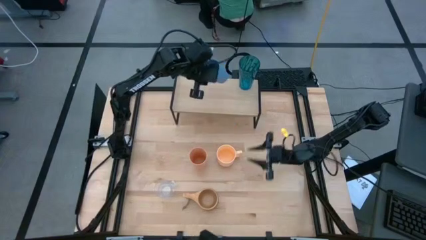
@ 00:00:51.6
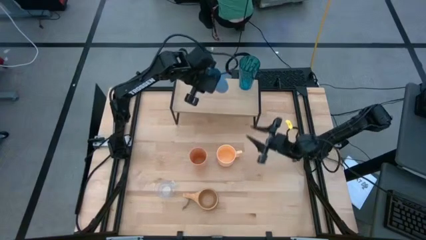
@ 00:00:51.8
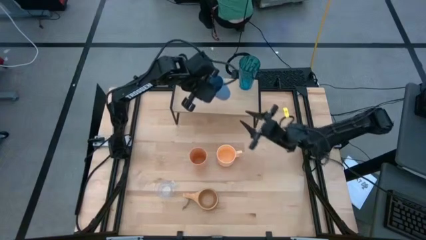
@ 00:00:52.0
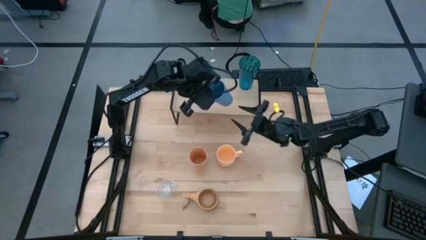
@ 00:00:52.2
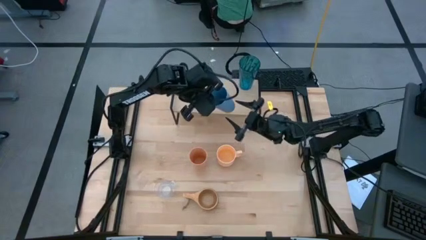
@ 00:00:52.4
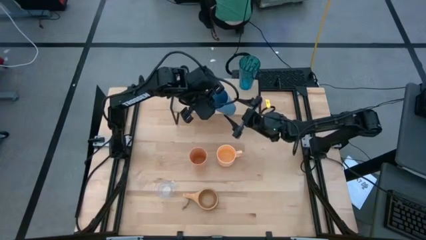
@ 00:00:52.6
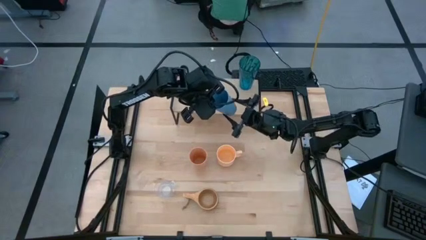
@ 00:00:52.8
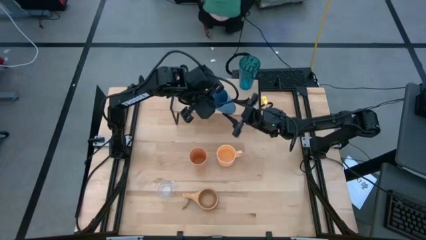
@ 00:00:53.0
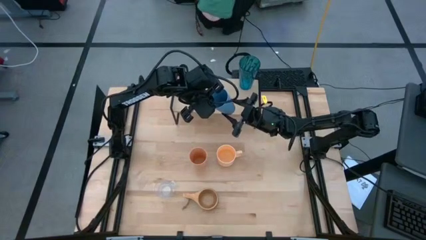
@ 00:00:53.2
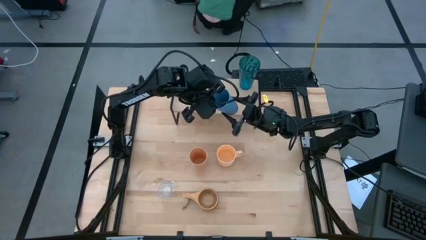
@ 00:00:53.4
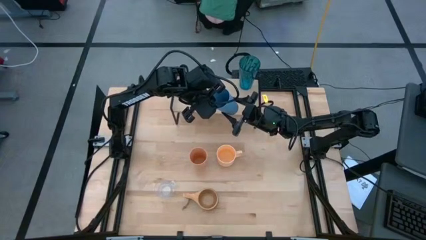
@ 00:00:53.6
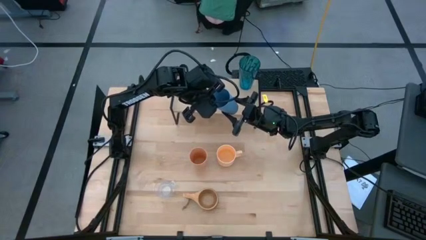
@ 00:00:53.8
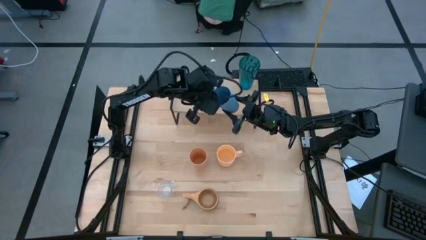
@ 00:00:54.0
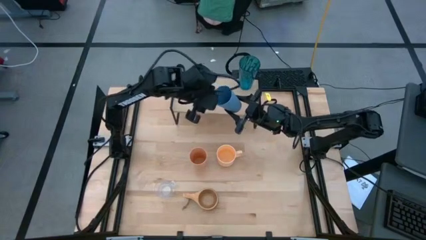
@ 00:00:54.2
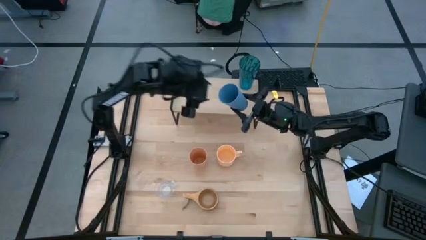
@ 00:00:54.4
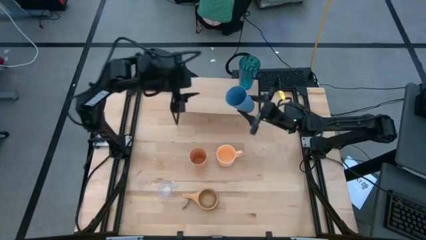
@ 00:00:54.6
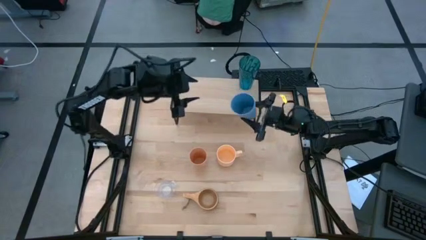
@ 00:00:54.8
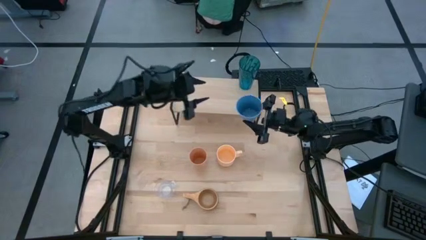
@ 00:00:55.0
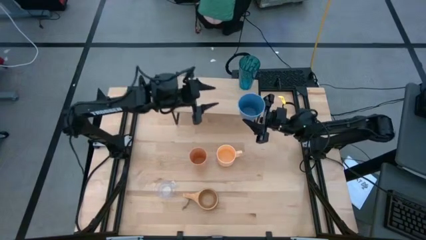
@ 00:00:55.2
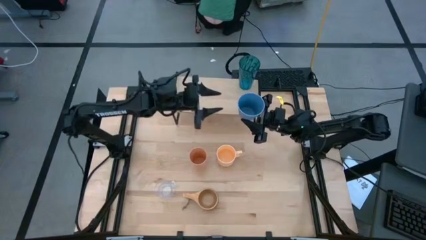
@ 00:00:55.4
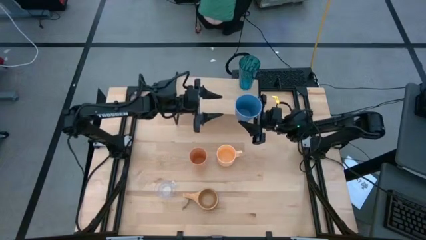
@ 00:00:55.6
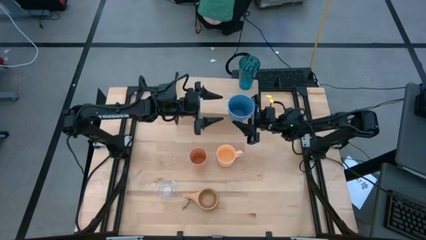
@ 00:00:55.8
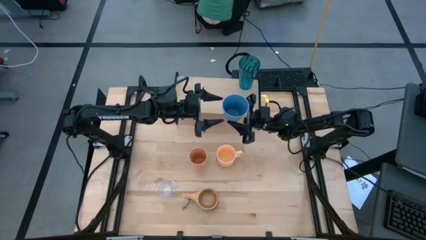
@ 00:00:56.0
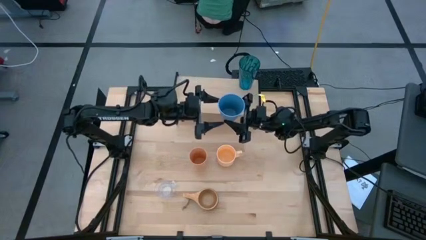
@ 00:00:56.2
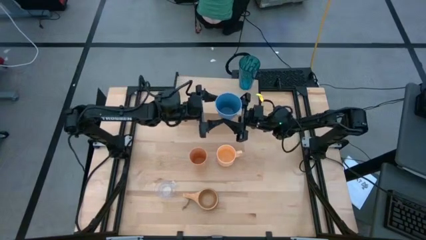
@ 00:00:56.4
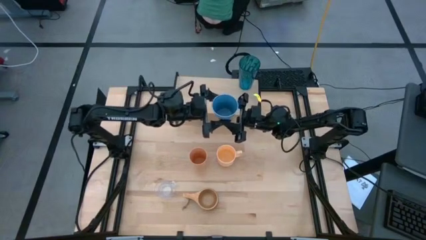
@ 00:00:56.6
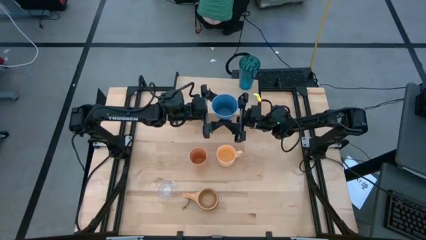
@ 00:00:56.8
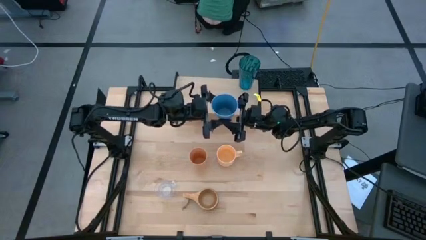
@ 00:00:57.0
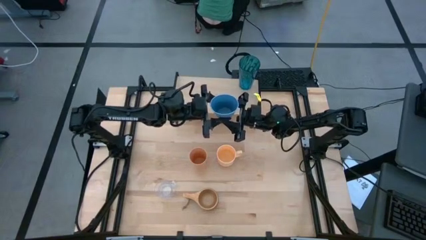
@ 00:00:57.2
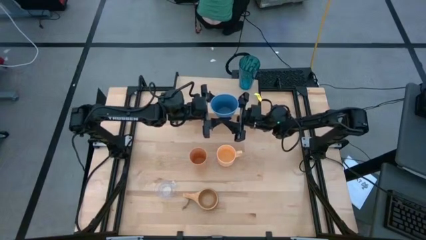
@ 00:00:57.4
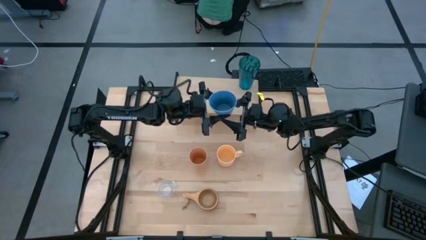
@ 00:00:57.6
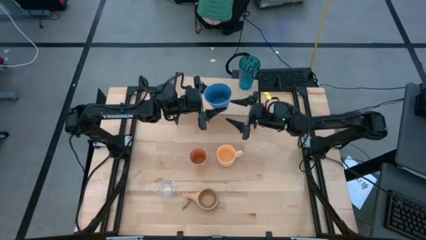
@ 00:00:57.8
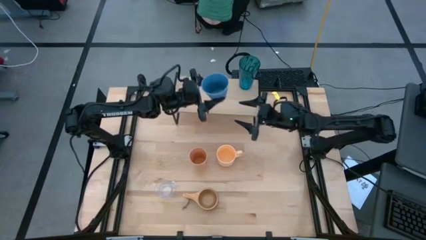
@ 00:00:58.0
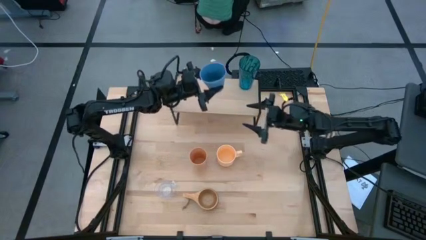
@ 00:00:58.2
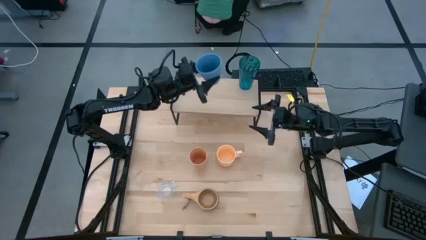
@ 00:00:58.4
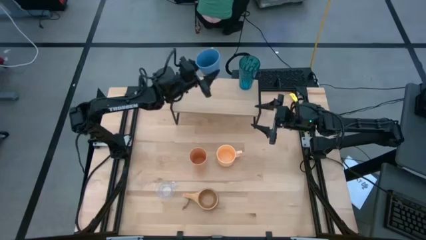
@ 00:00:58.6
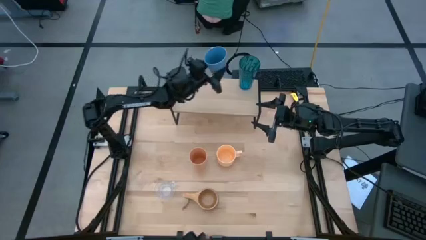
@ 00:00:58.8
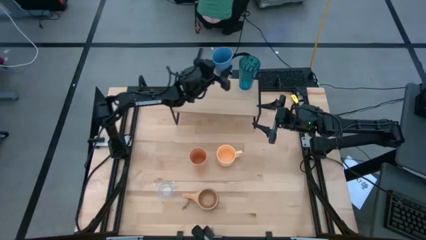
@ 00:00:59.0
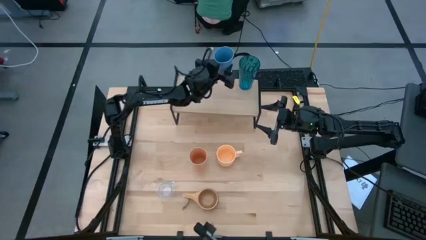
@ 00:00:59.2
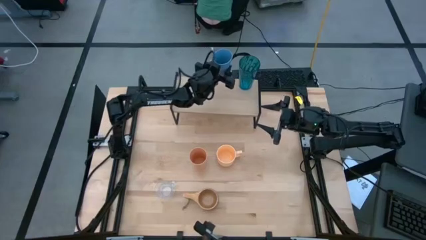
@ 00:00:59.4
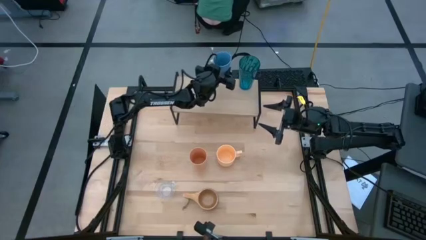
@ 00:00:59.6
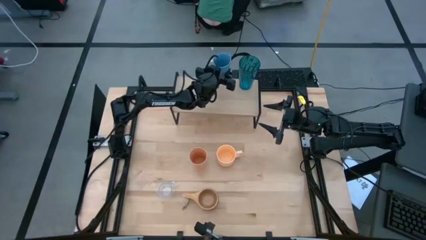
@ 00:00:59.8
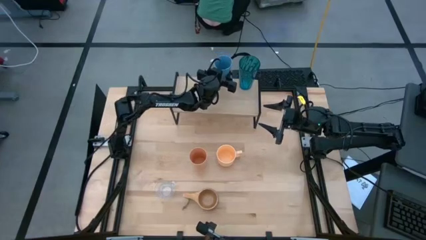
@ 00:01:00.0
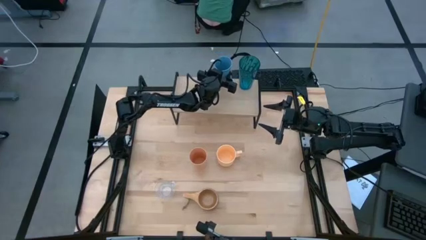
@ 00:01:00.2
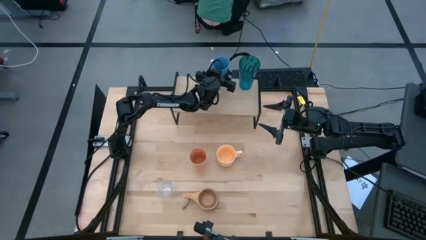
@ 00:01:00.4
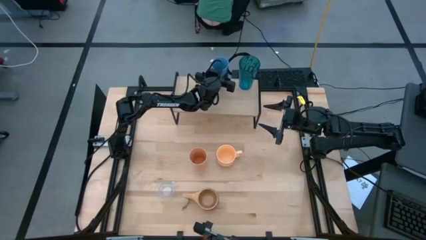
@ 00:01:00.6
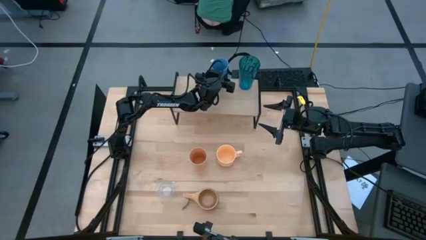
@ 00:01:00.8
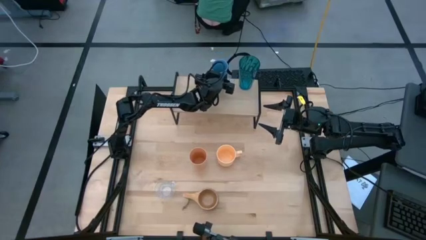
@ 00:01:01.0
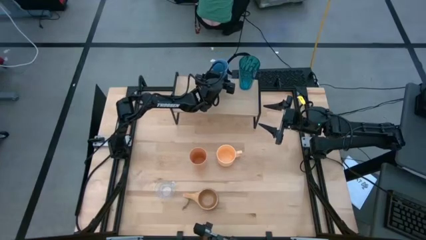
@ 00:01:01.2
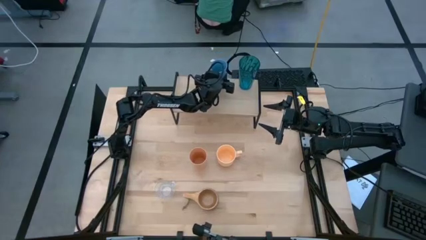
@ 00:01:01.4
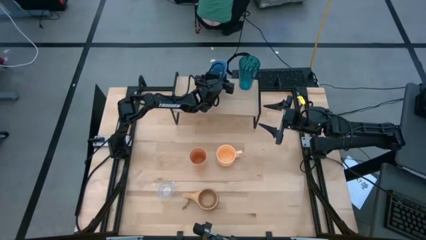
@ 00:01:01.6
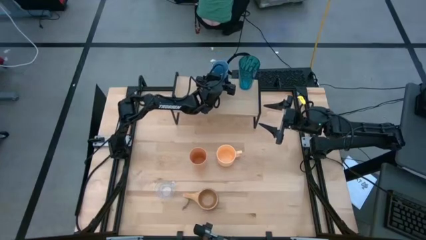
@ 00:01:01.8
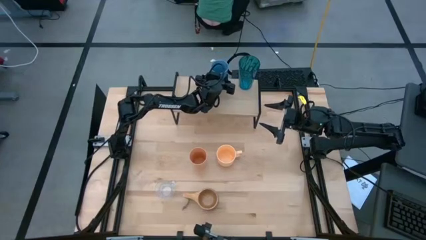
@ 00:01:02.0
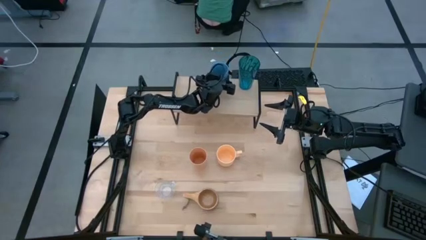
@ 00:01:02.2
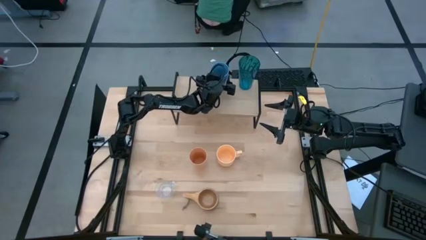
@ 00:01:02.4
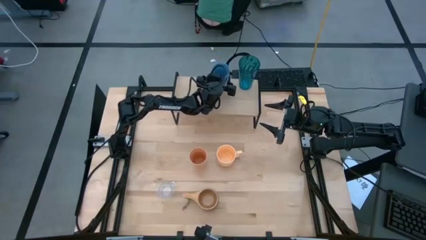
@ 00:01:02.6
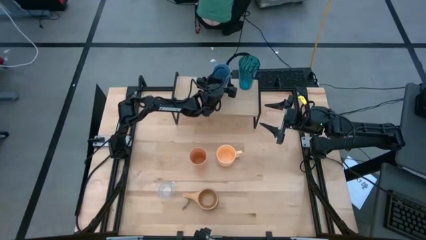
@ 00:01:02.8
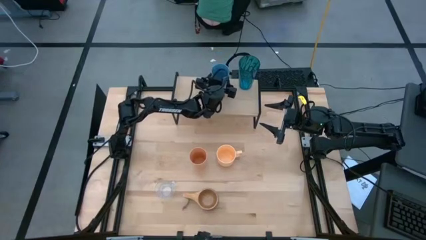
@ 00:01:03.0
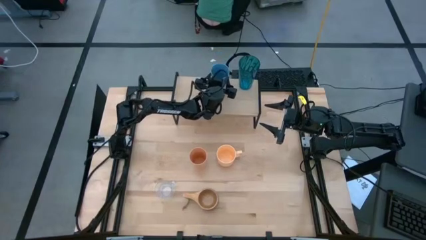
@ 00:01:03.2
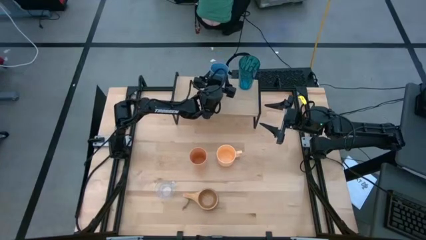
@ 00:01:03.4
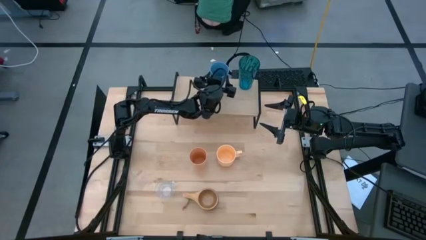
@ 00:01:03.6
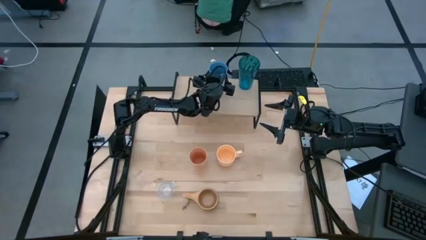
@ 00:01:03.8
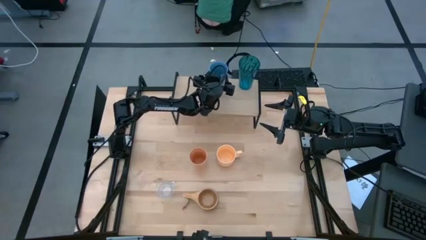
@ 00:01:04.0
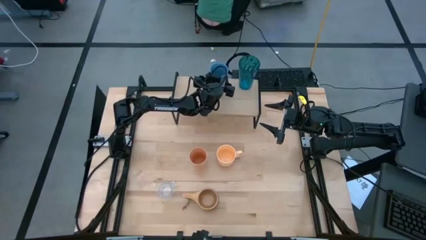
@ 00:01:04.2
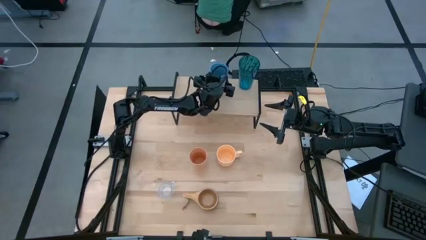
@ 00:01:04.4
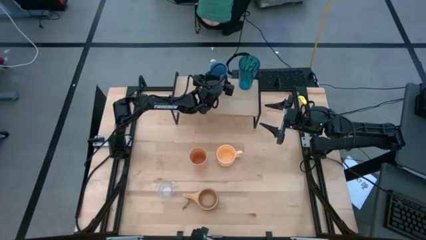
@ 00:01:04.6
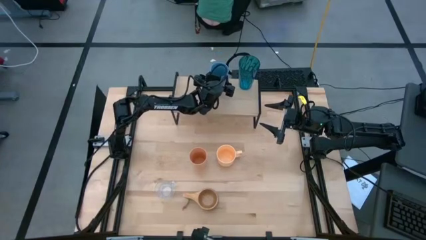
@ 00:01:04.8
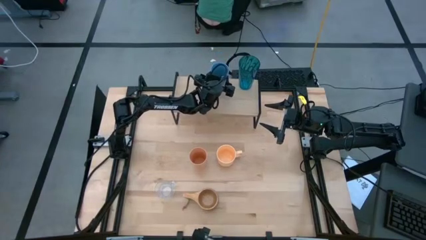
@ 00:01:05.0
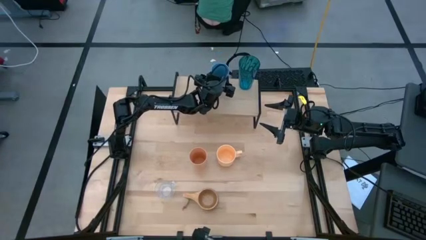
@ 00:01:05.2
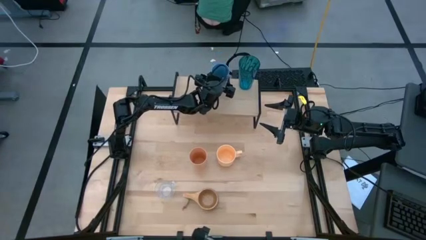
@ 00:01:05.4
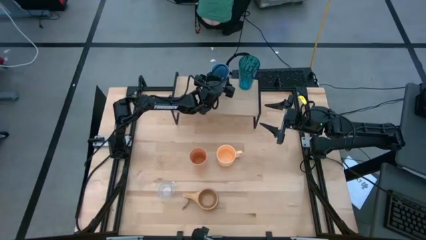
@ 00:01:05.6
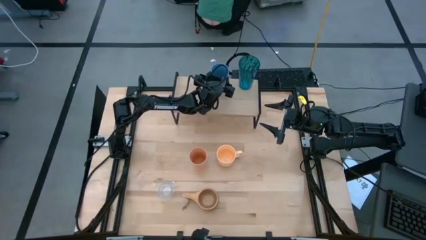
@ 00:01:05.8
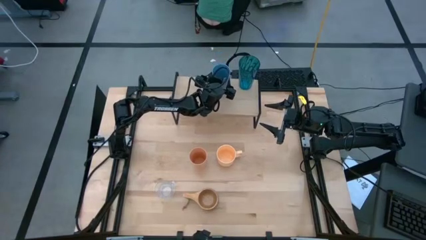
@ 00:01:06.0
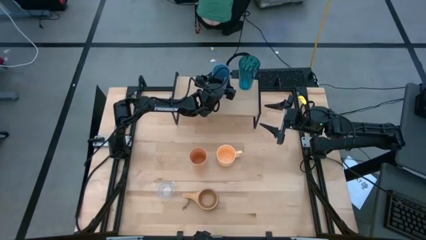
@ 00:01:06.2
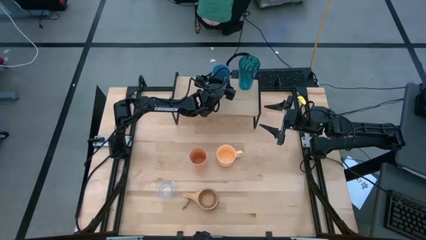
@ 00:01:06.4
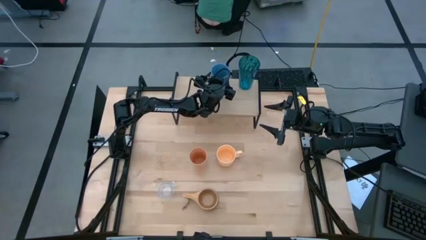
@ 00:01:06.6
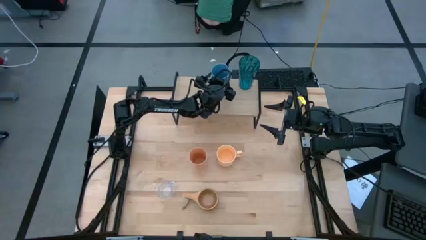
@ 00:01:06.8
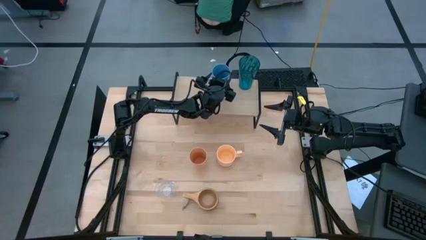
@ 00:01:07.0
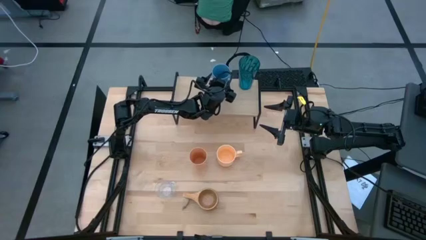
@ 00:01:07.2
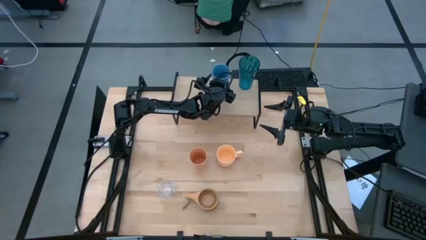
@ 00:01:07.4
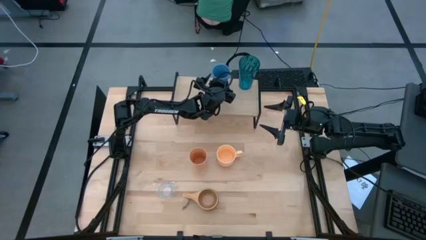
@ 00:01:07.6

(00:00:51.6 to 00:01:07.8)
Task: Stack small to large cups/mugs on shelf
Put the light blue cup on the shelf
